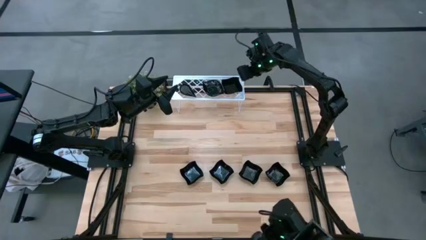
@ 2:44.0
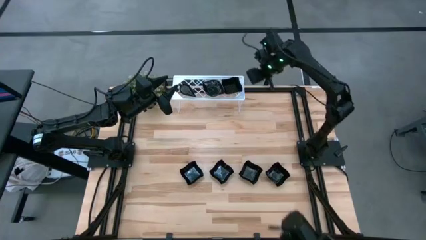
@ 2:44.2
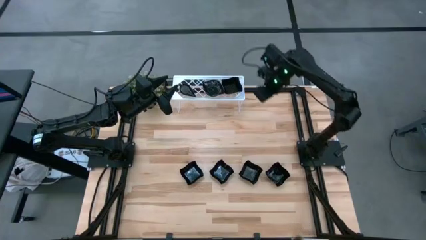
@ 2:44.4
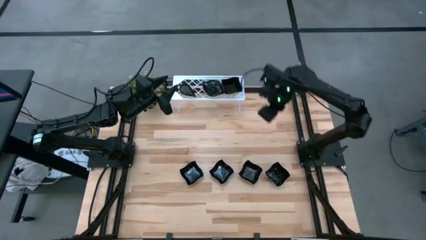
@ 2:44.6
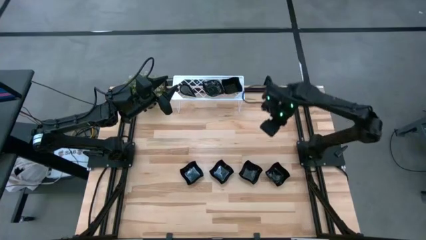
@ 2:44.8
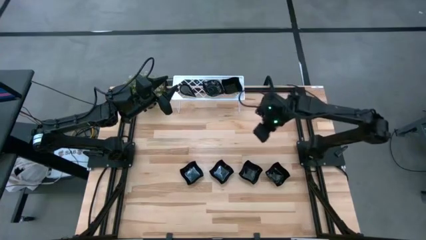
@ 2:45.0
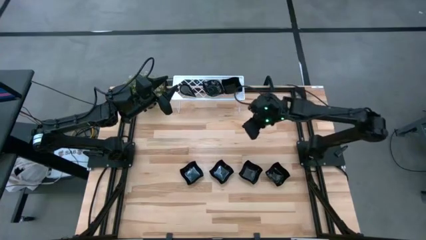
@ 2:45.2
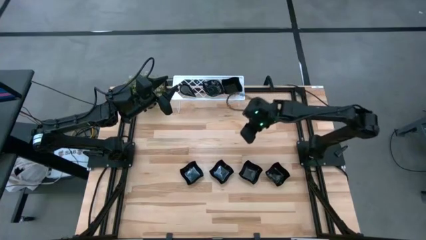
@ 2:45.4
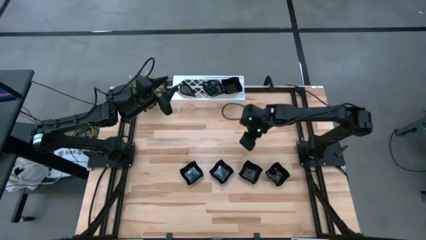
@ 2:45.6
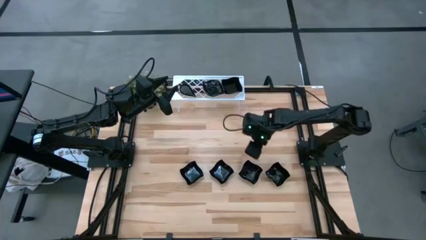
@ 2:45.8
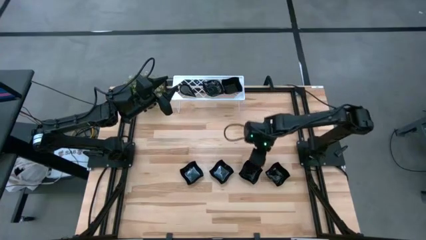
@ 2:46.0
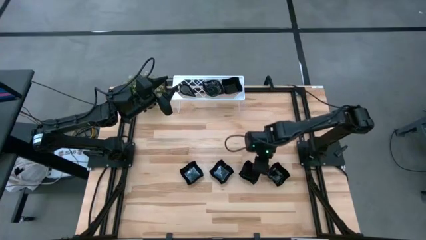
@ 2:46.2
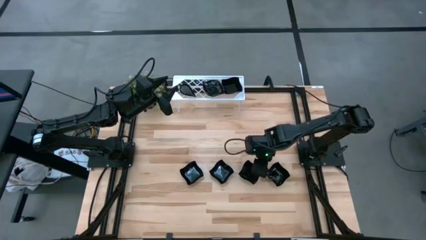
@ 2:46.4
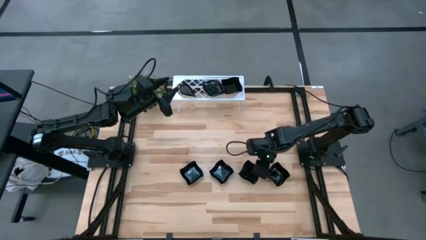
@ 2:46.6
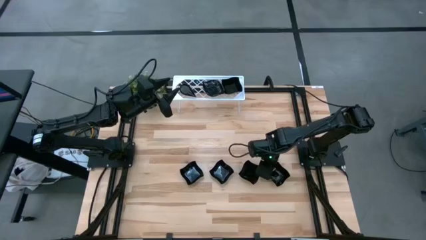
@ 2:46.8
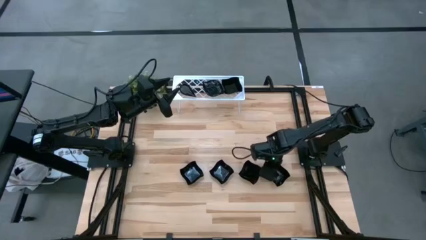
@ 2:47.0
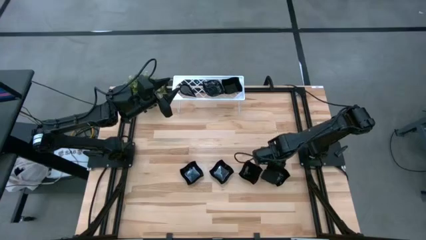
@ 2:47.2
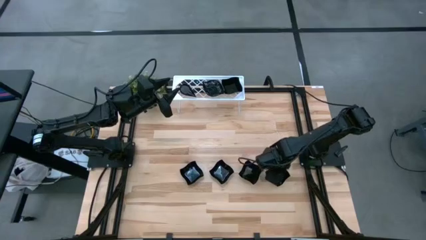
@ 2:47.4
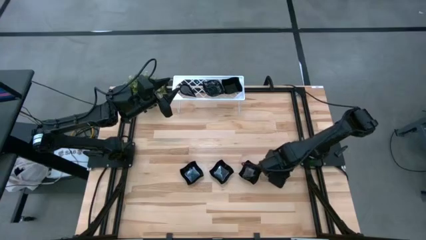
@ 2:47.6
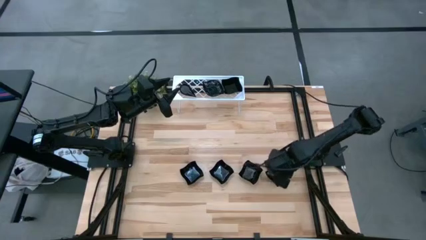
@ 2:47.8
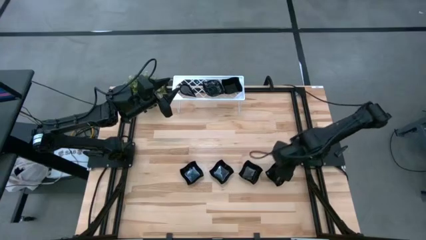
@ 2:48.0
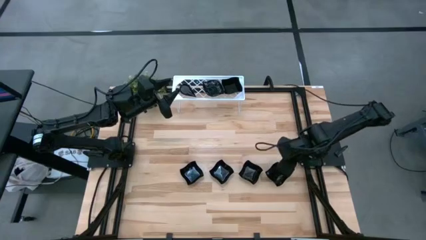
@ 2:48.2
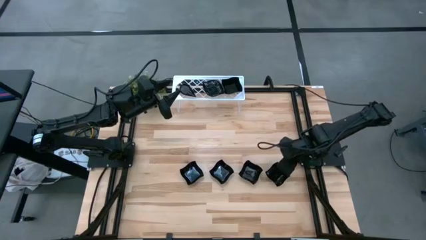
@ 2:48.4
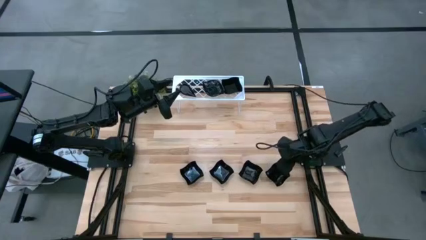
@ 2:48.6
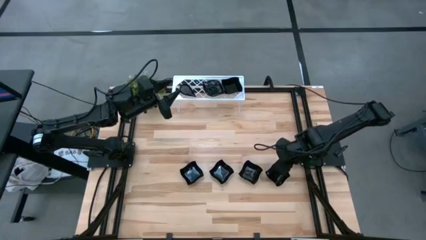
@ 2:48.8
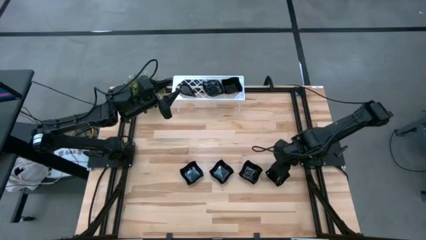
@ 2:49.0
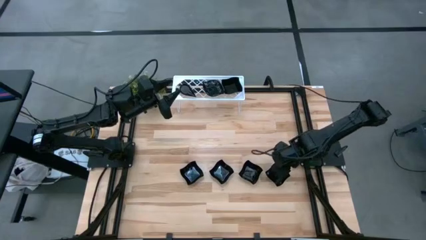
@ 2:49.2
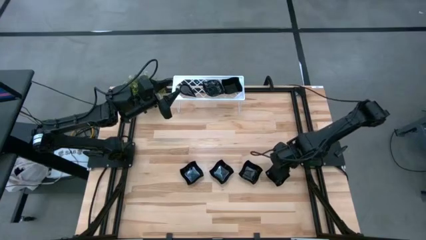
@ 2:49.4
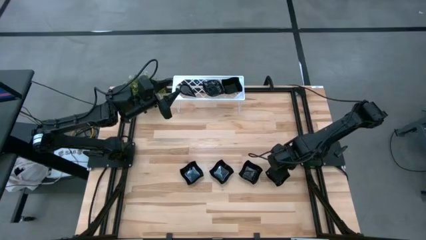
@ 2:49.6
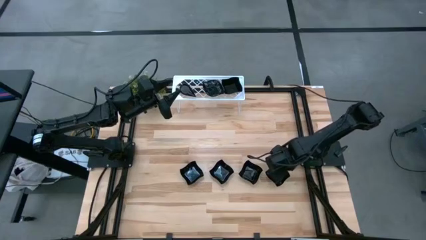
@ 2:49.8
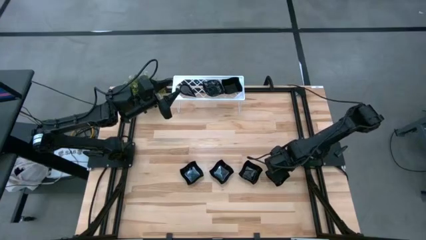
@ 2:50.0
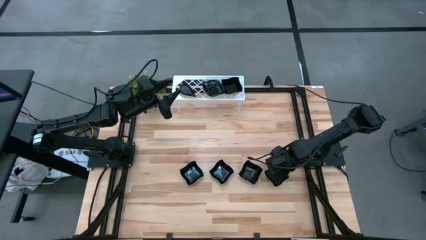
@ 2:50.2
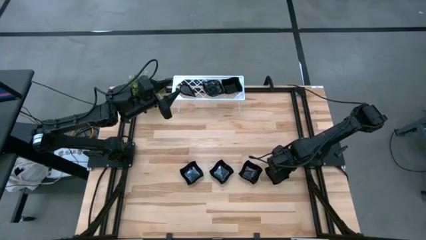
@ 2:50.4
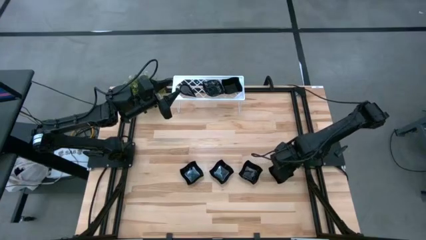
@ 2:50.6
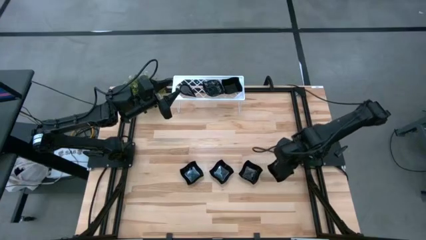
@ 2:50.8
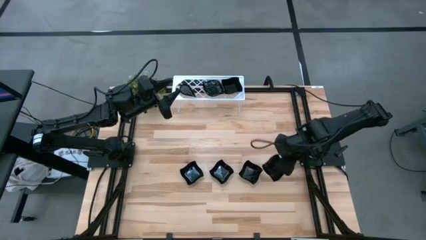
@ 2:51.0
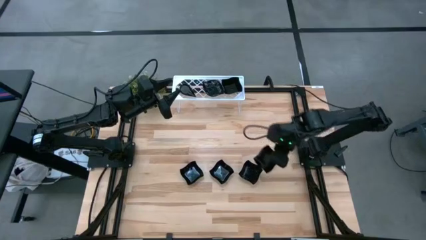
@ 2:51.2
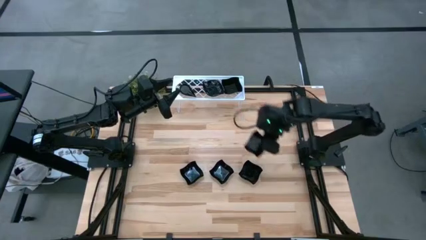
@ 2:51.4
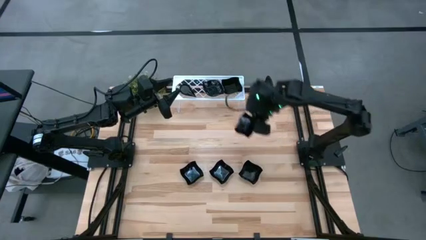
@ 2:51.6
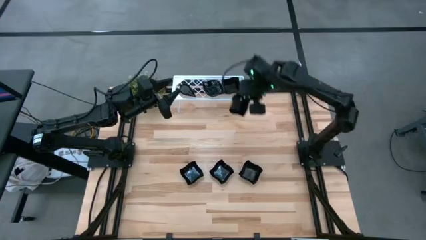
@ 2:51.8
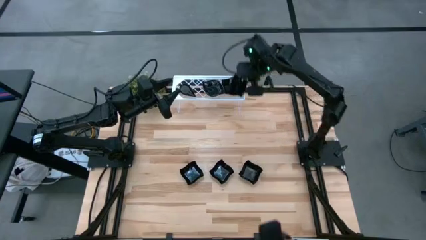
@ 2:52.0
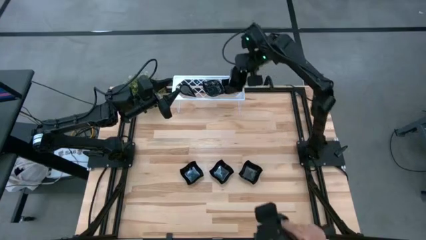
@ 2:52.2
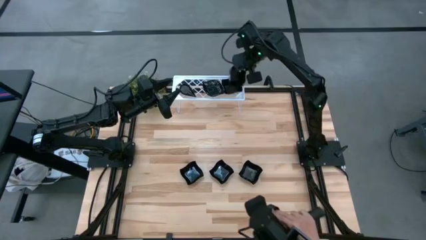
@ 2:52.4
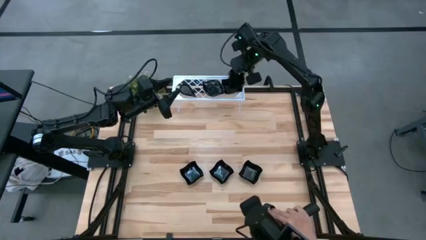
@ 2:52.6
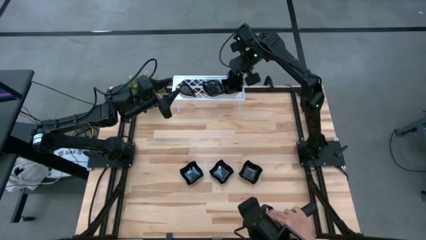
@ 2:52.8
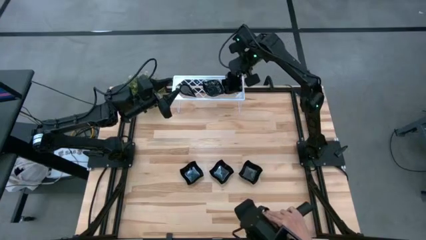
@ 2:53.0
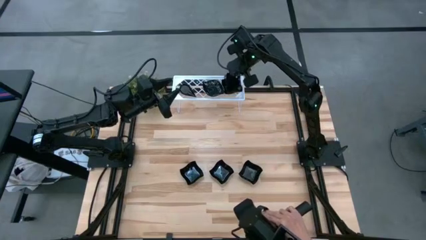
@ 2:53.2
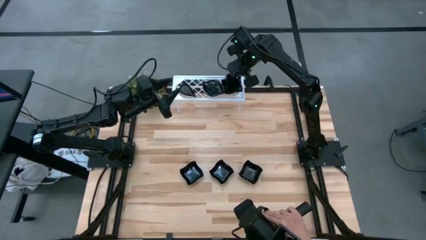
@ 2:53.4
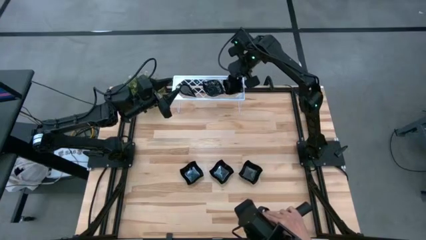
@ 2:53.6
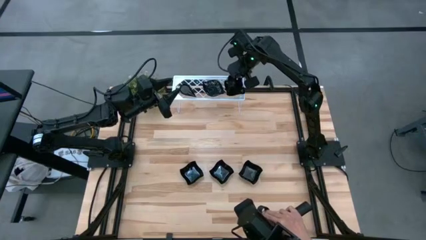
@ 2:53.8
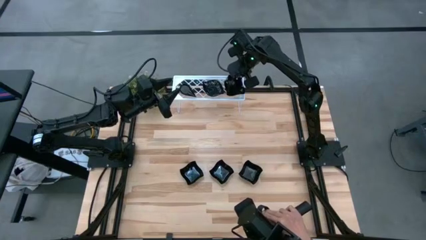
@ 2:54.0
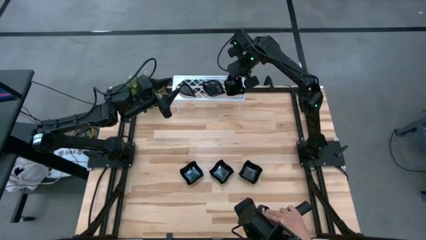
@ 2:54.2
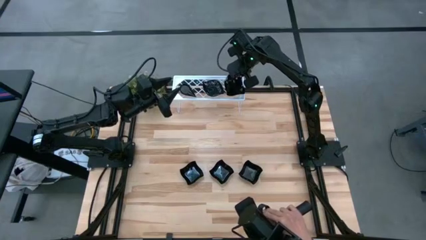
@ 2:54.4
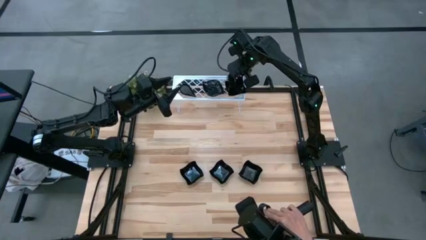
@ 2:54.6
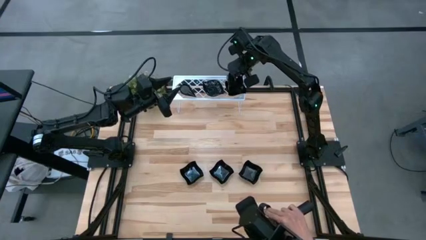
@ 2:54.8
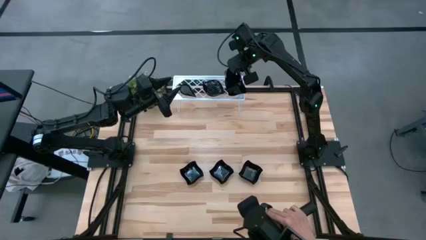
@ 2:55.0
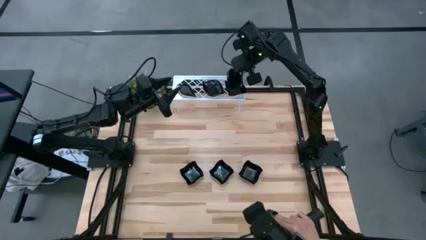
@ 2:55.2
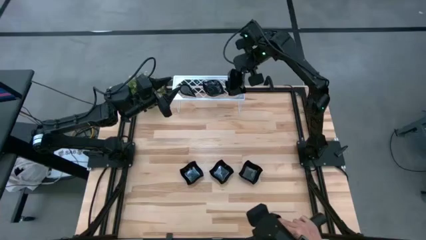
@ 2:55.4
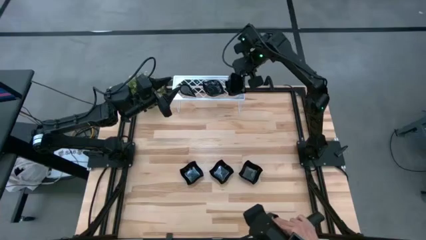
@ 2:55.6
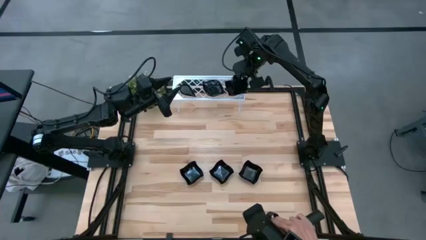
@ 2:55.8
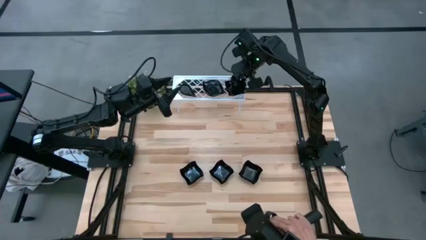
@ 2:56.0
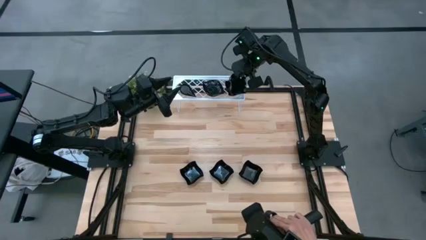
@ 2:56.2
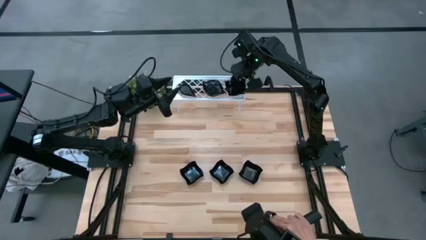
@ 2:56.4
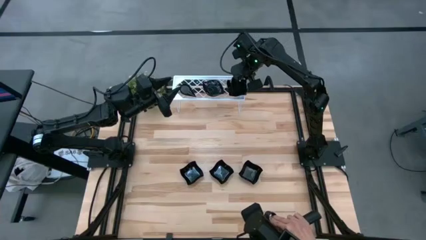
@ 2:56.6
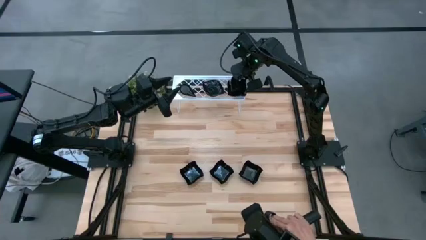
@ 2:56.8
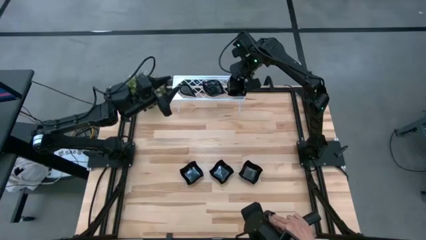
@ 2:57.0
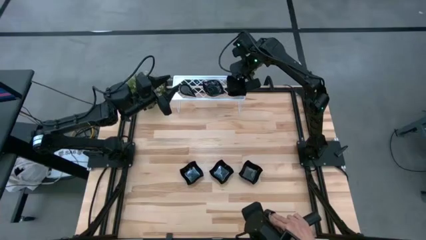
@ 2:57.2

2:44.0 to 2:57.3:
Task: Pick & Place Mini shaped plates
Stack the black distorted square plate on top of the black distorted square plate on the shelf
